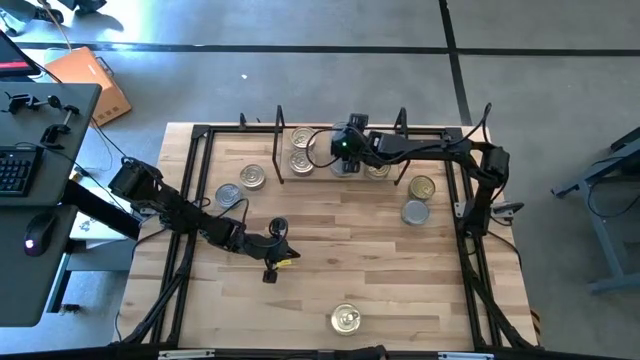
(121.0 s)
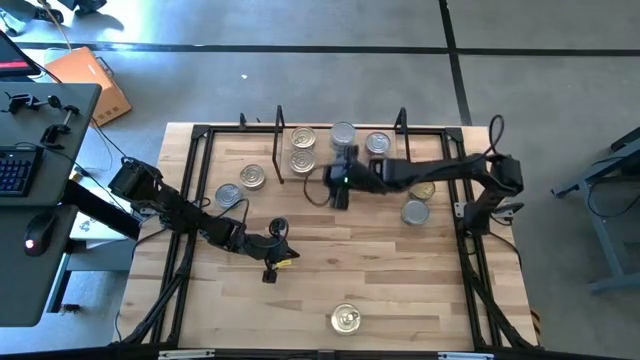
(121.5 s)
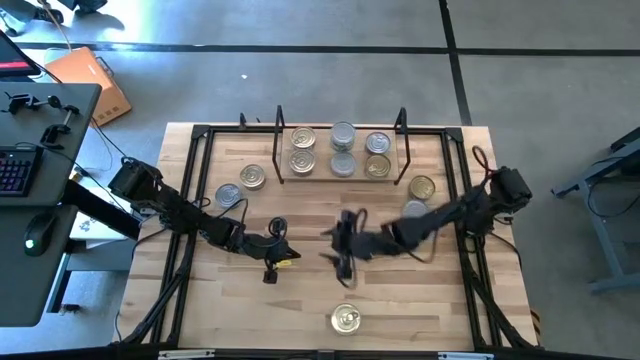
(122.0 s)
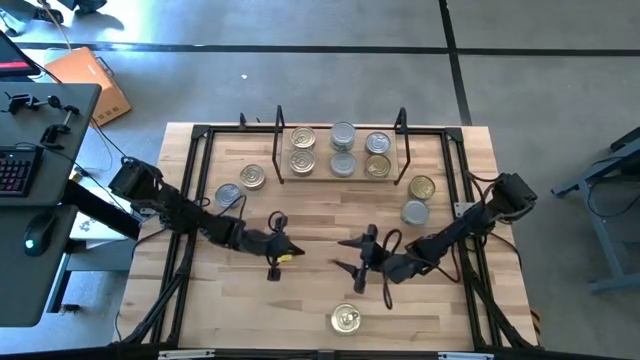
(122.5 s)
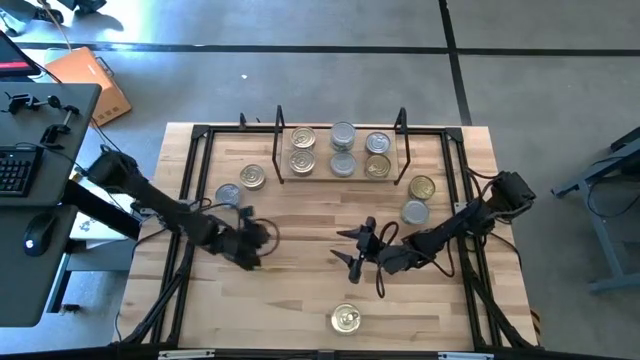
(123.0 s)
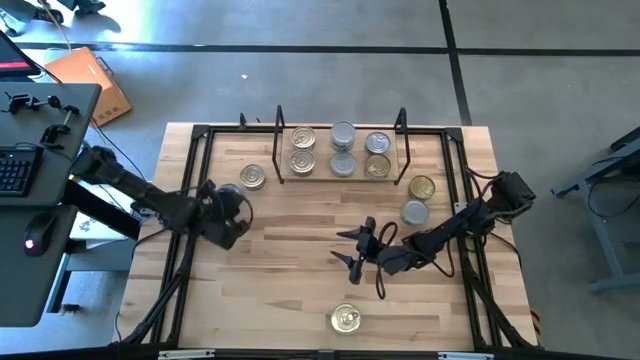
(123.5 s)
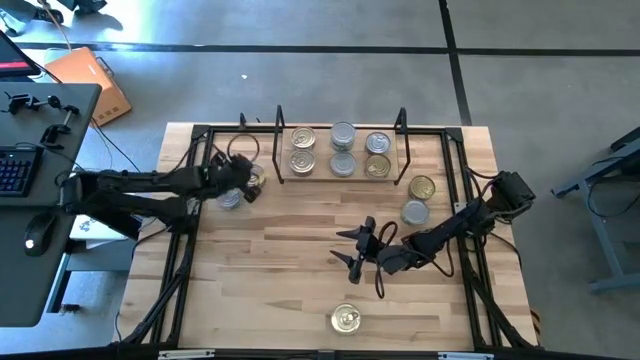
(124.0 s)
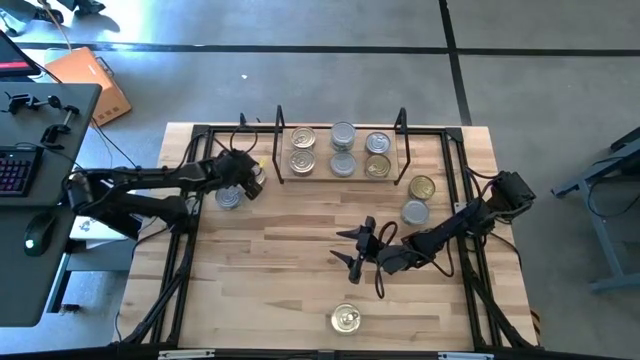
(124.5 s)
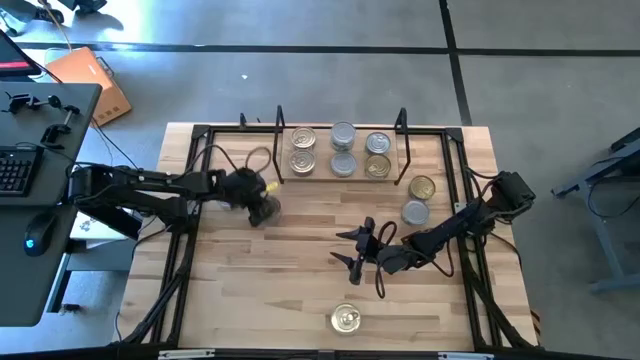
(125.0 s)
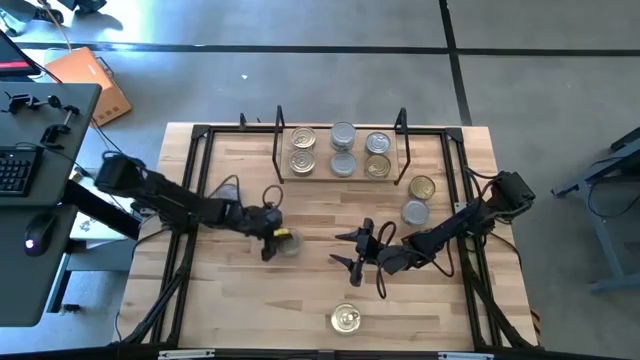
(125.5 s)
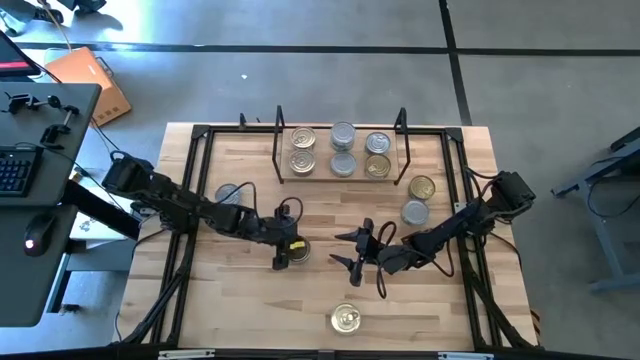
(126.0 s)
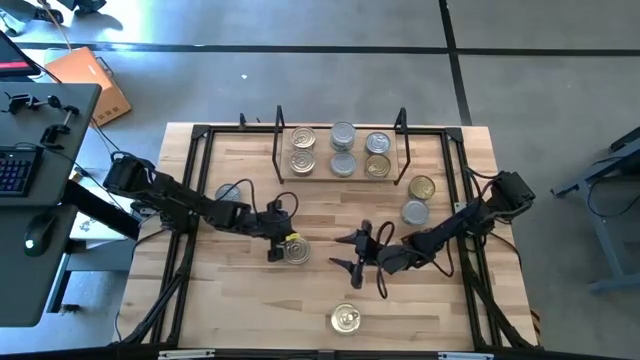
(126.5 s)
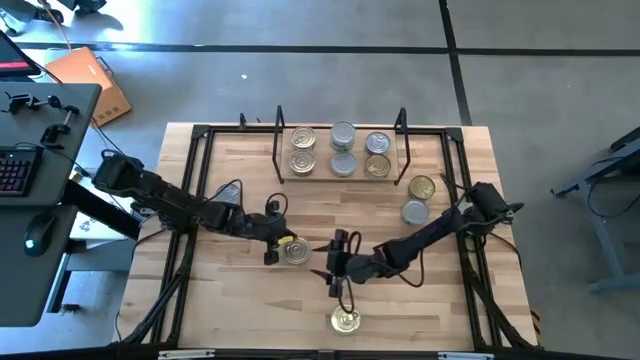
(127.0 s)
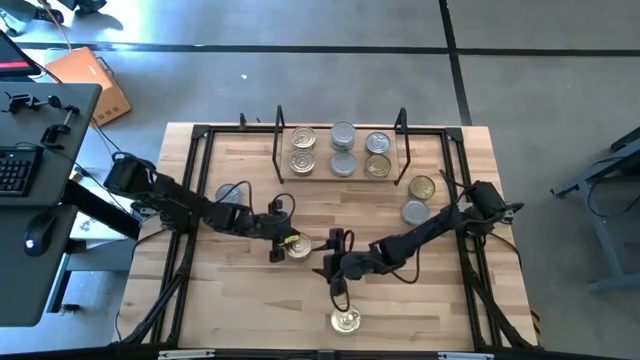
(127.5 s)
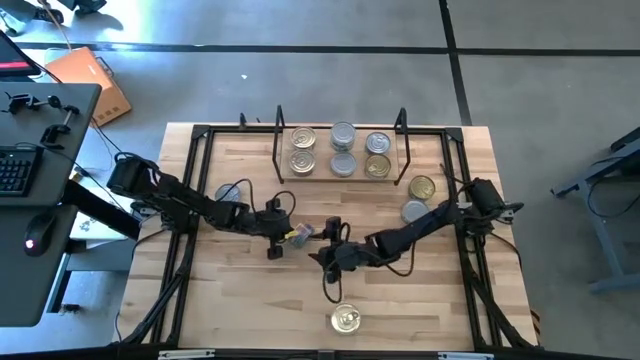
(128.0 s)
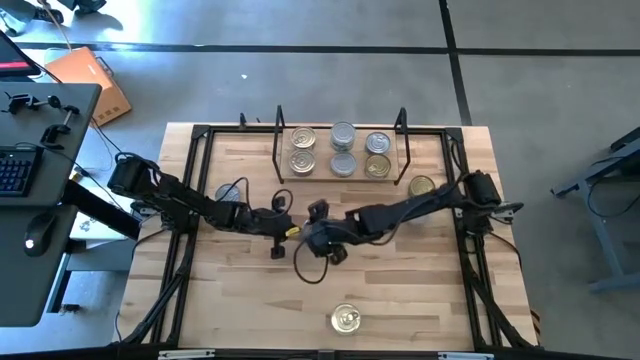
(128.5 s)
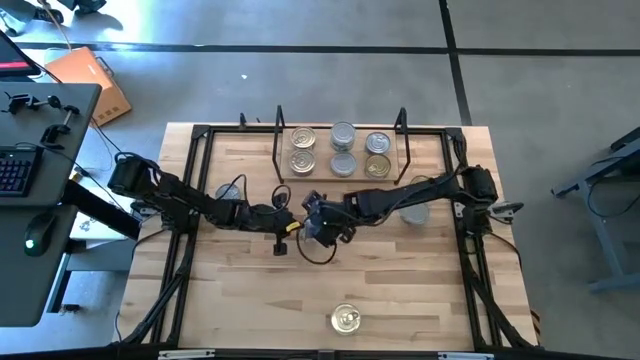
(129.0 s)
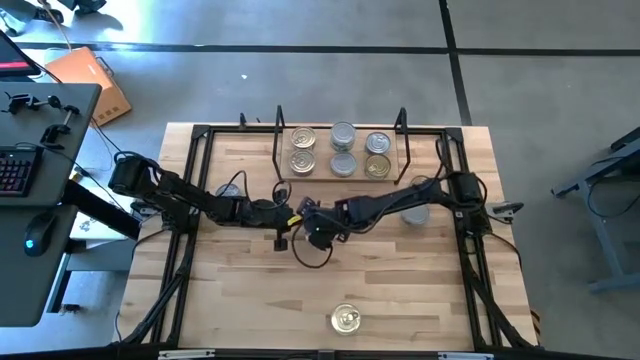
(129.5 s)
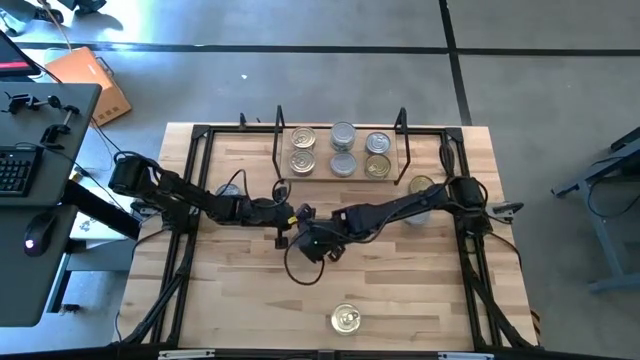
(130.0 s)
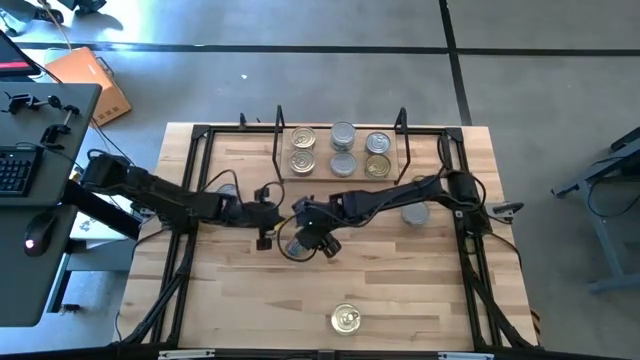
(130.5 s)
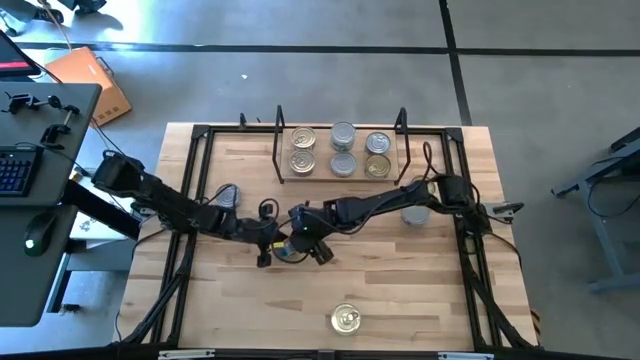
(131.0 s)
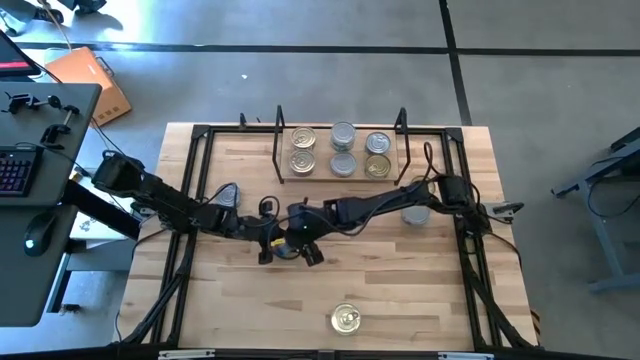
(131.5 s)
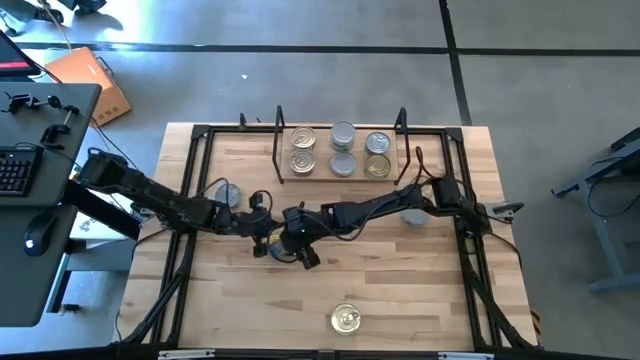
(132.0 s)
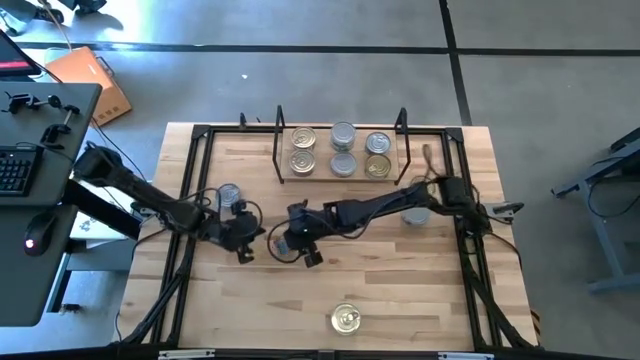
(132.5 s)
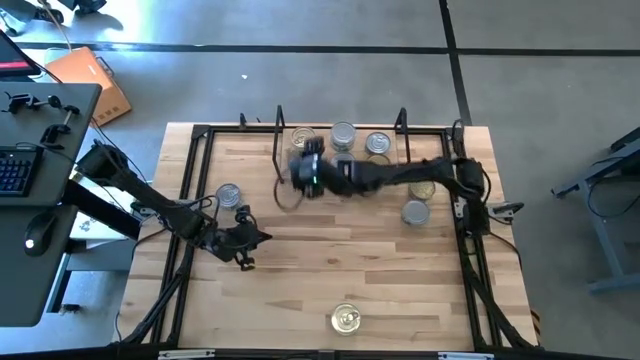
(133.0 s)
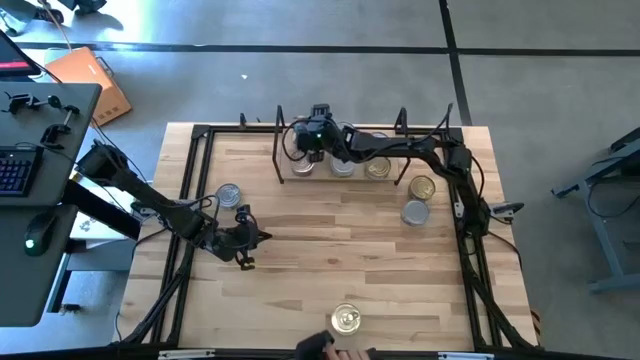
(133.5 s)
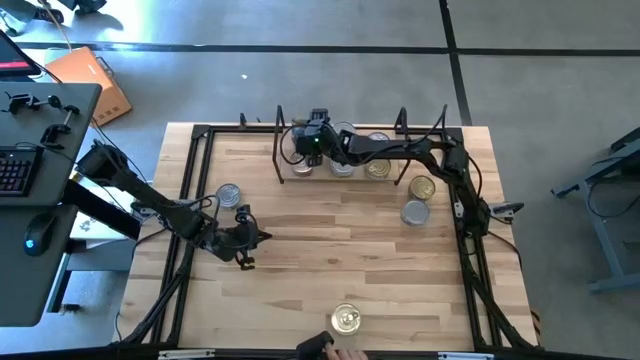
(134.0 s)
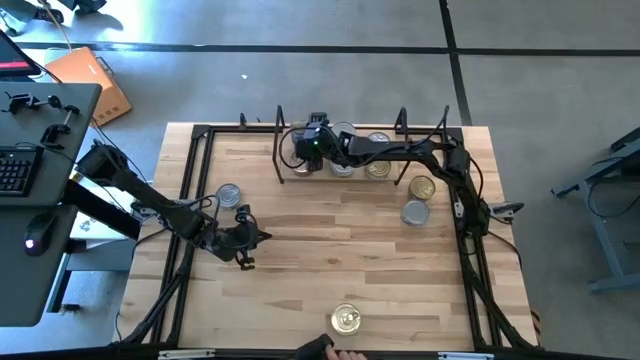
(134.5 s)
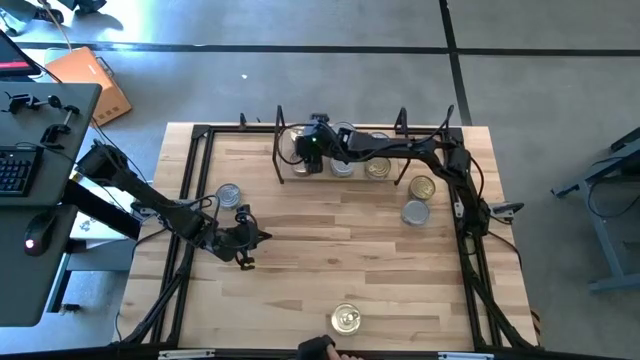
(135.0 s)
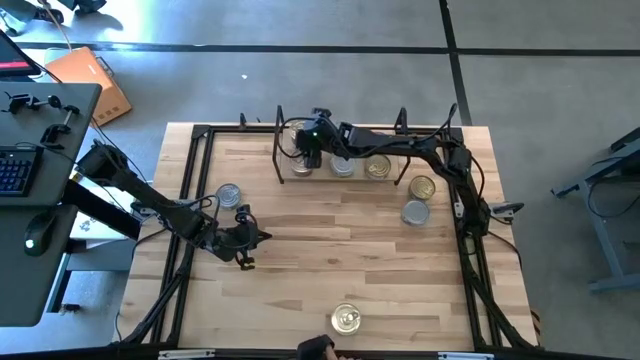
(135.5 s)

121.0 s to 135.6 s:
Task: Stack canned seafood by type on shelf
Stack the blue-pink tuna can on top of the blue-pink tuna can on the shelf

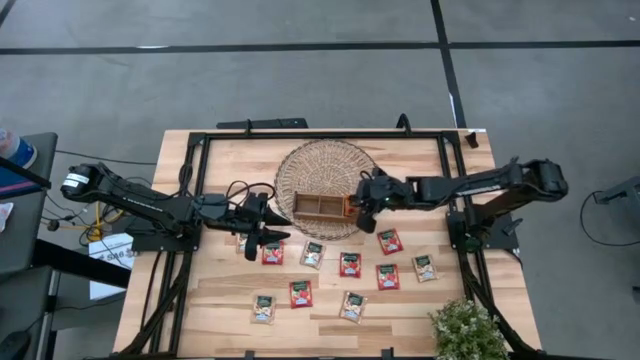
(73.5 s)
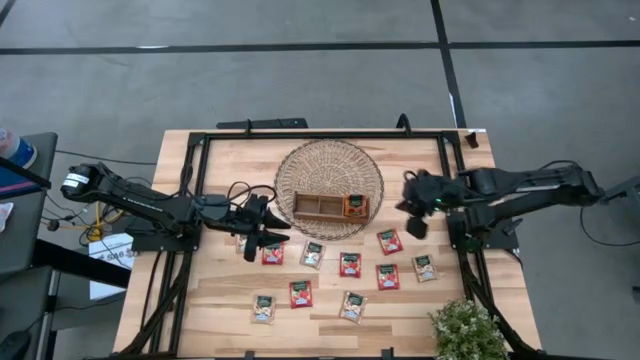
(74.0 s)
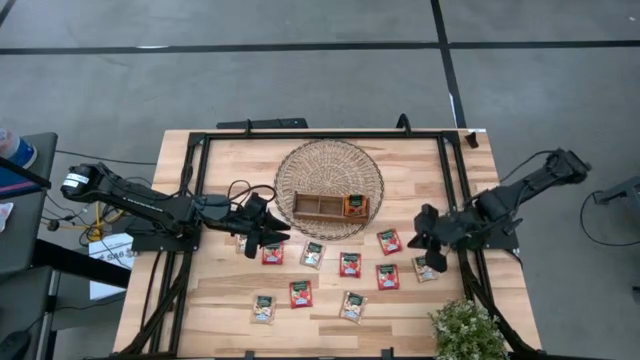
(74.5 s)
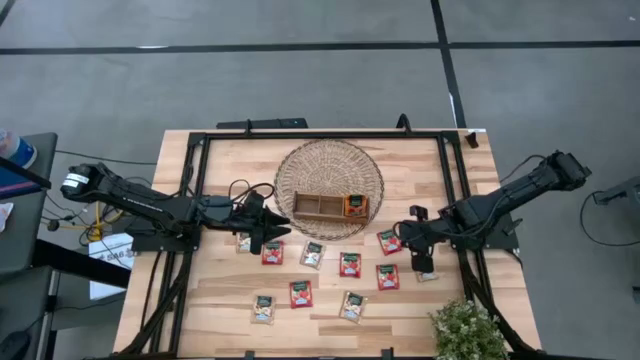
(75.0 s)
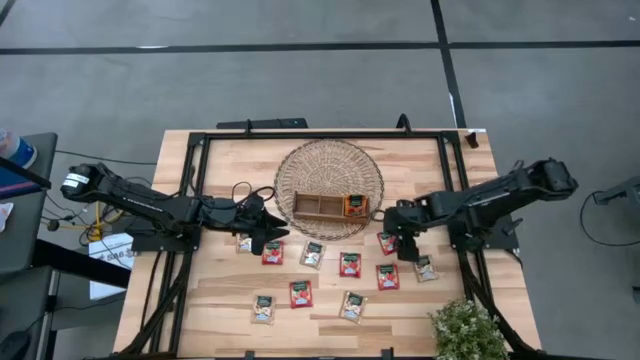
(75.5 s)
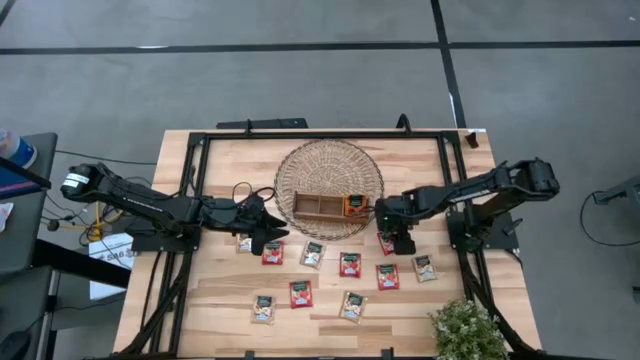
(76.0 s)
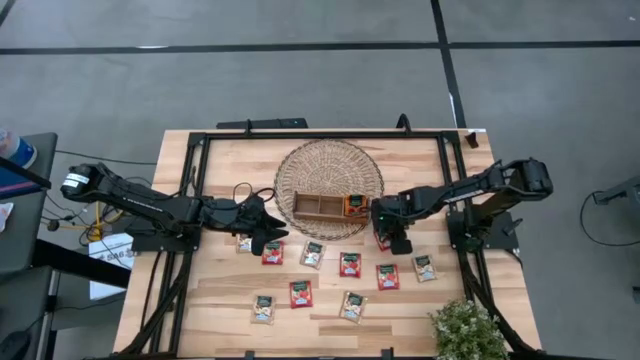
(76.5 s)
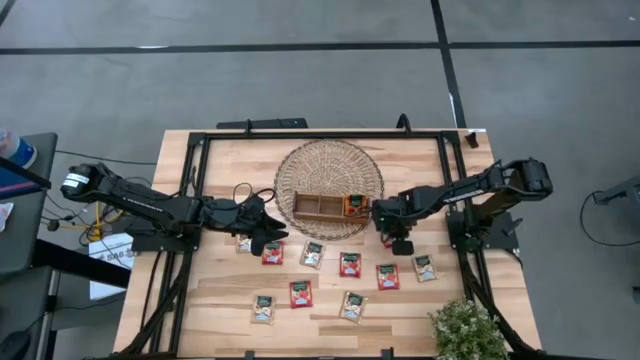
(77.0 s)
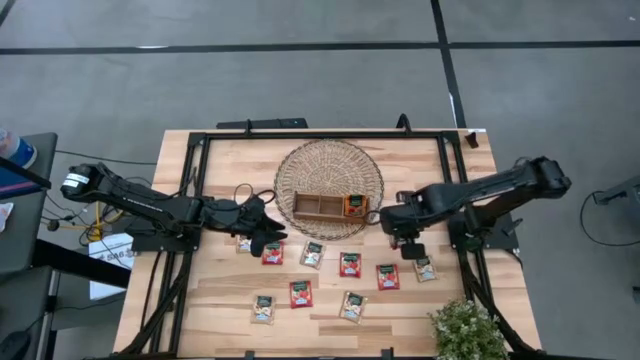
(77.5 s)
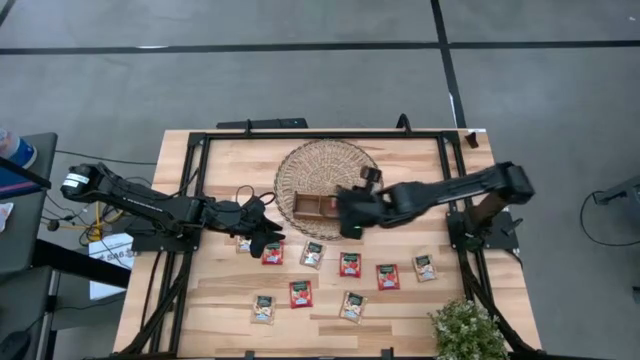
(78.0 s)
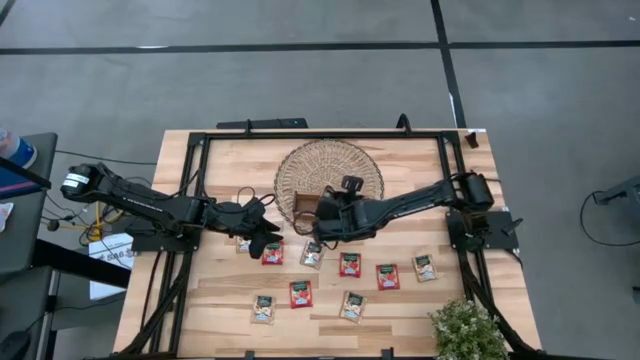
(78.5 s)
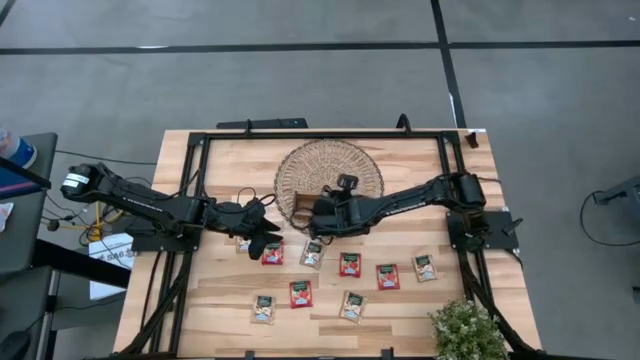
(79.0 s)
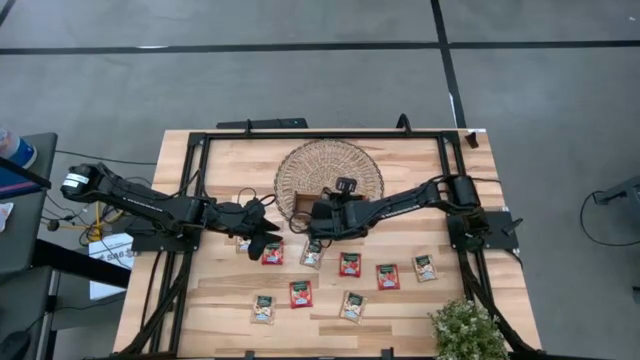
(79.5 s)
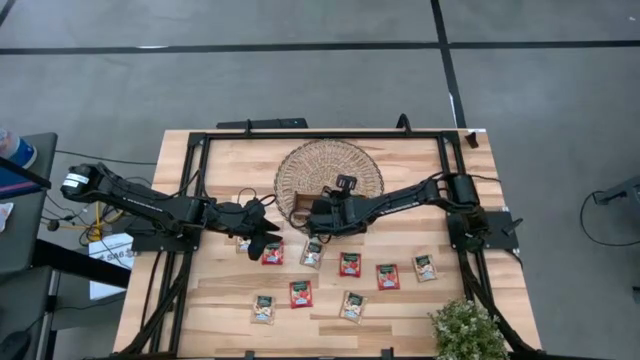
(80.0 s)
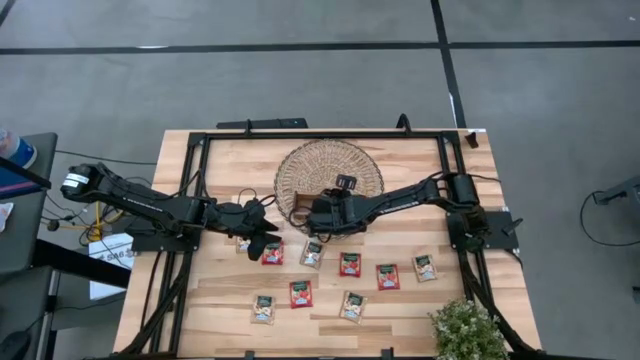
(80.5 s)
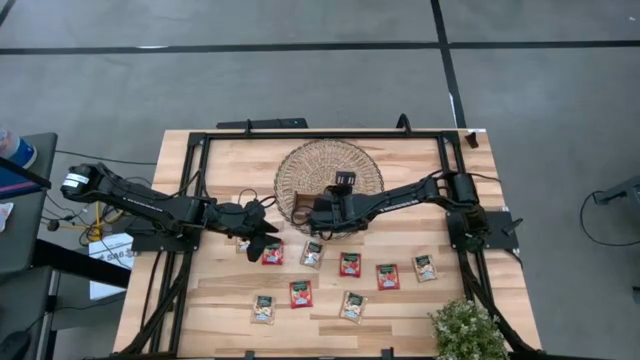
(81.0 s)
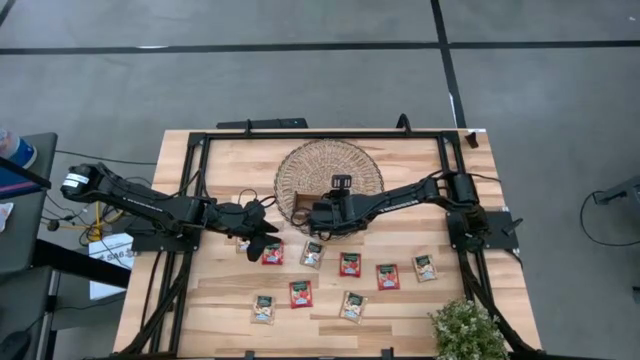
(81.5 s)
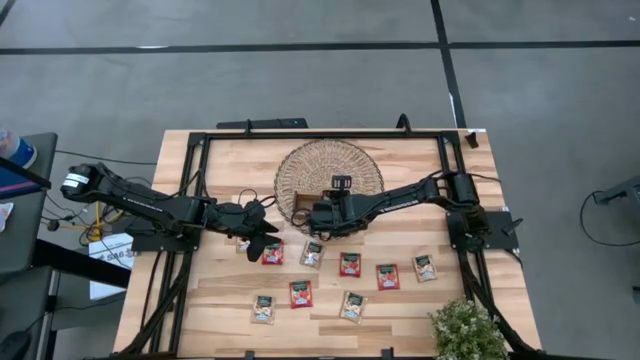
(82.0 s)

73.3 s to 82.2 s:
Task: Pick & Place Tea
Put the red tea bag into the middle section of the wooden organizer
